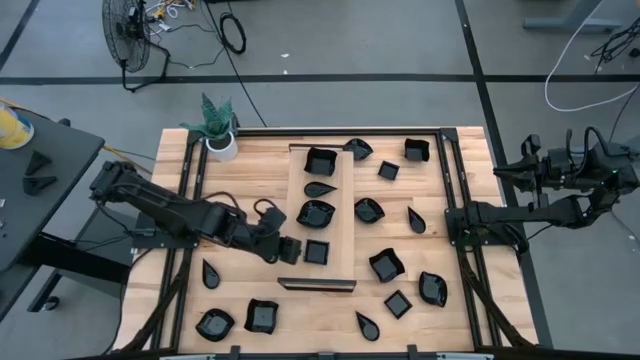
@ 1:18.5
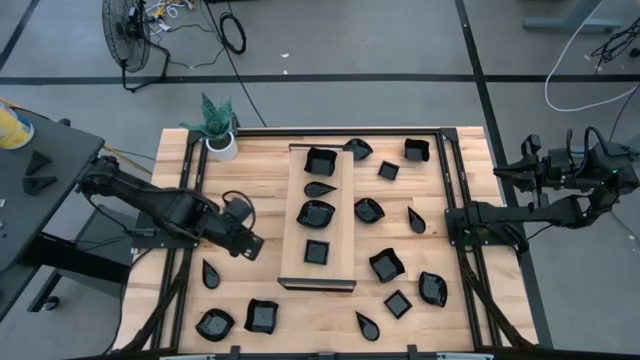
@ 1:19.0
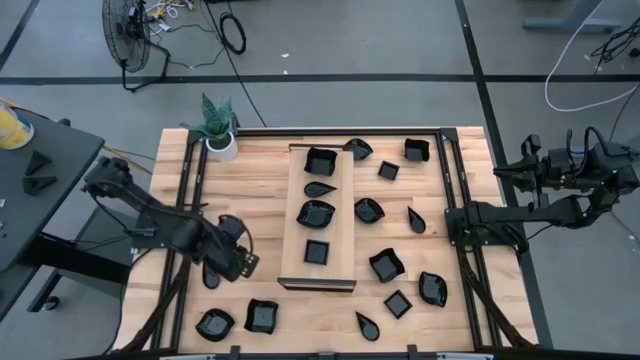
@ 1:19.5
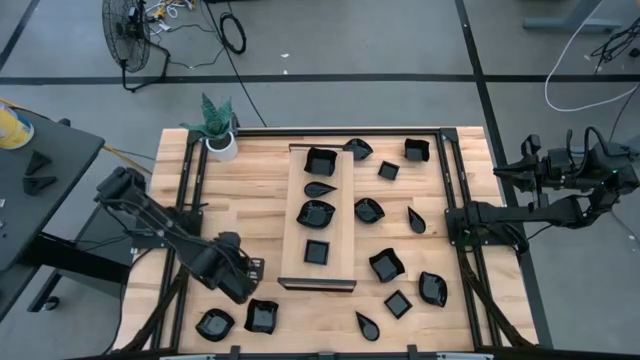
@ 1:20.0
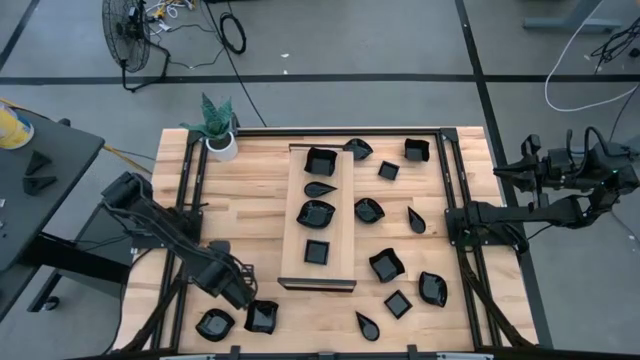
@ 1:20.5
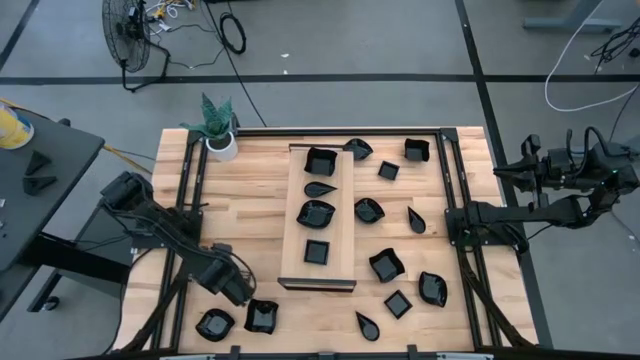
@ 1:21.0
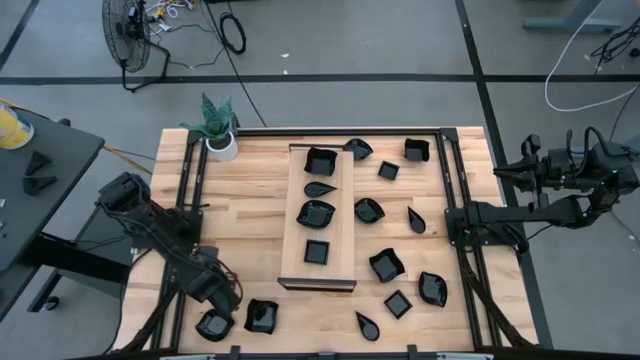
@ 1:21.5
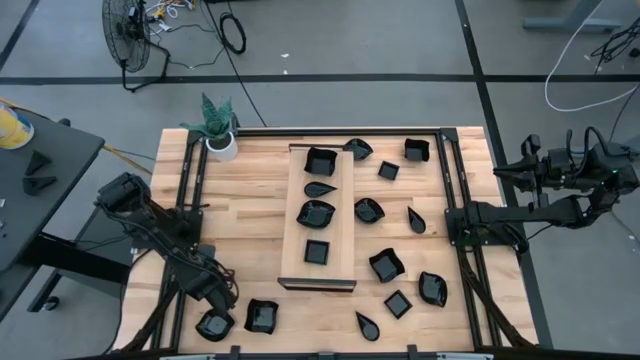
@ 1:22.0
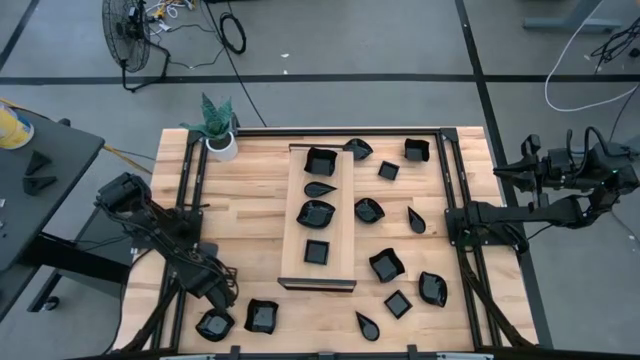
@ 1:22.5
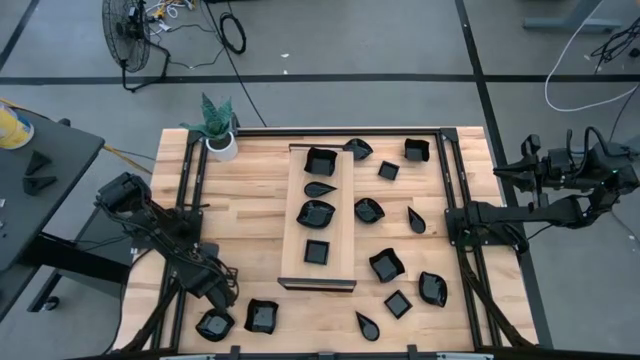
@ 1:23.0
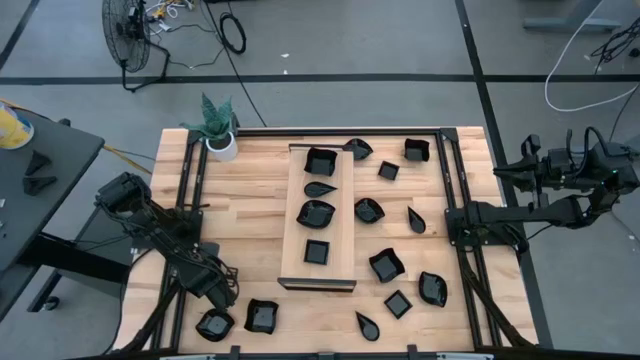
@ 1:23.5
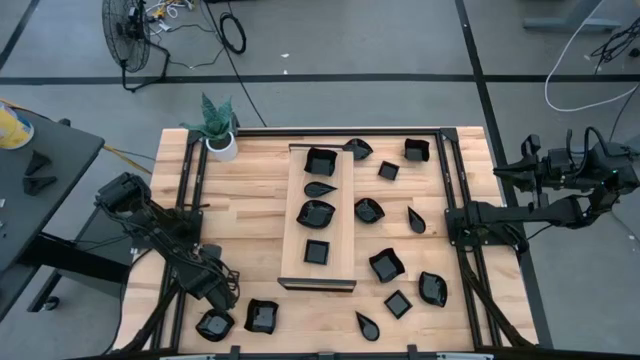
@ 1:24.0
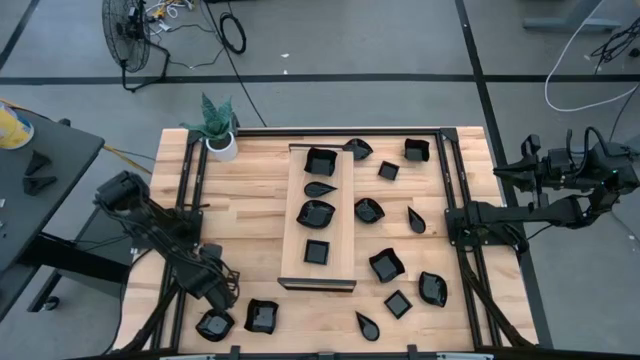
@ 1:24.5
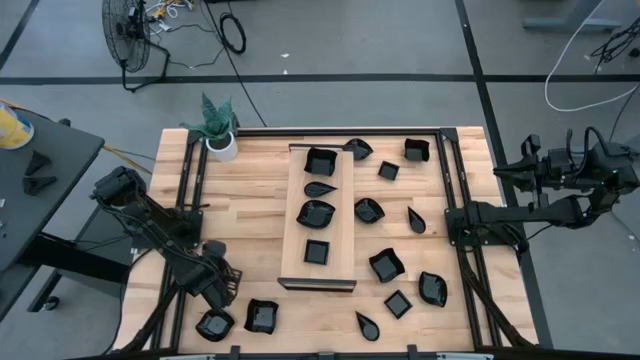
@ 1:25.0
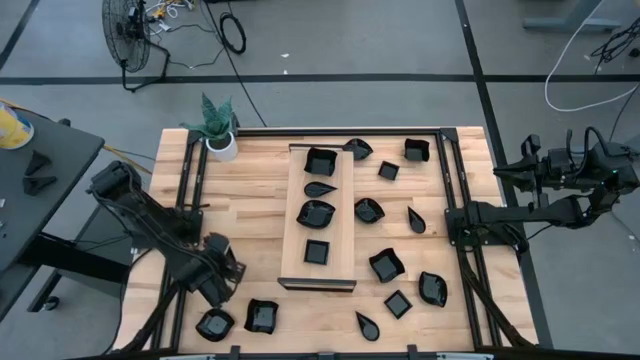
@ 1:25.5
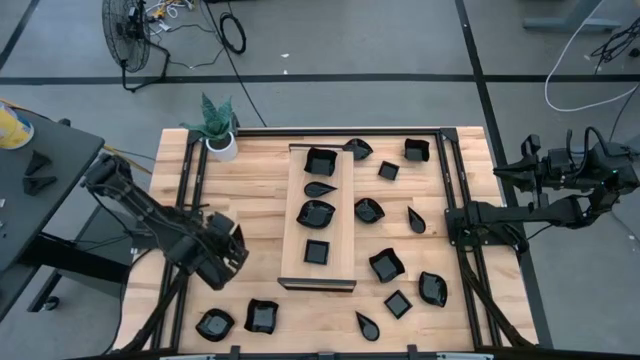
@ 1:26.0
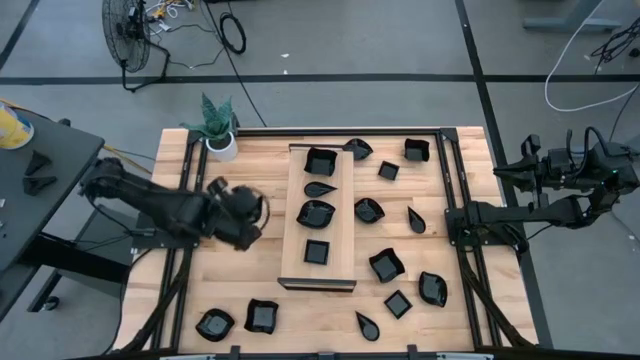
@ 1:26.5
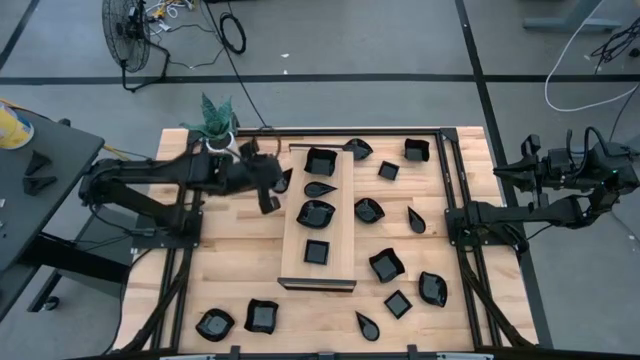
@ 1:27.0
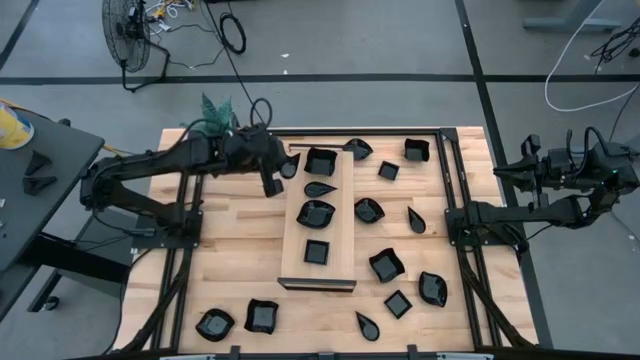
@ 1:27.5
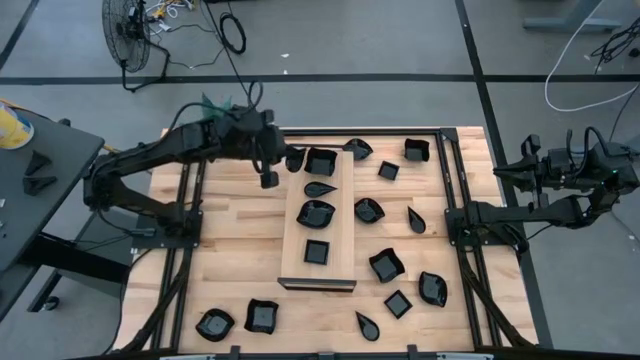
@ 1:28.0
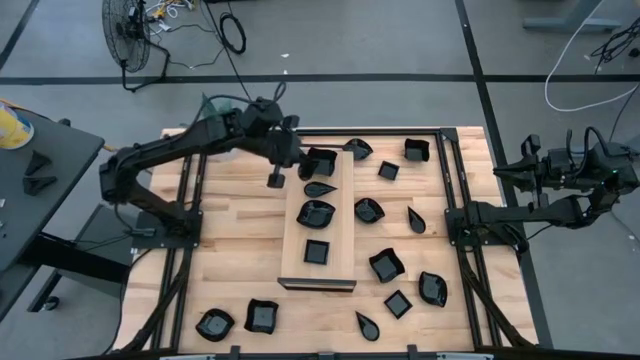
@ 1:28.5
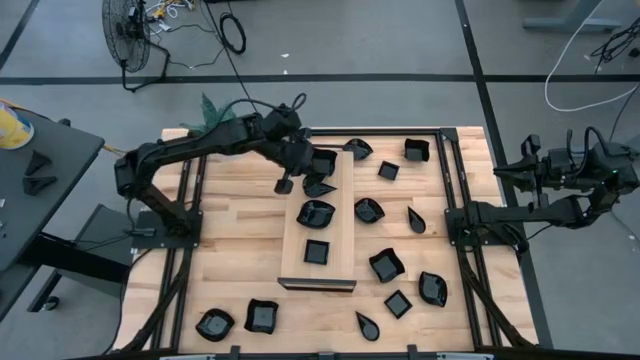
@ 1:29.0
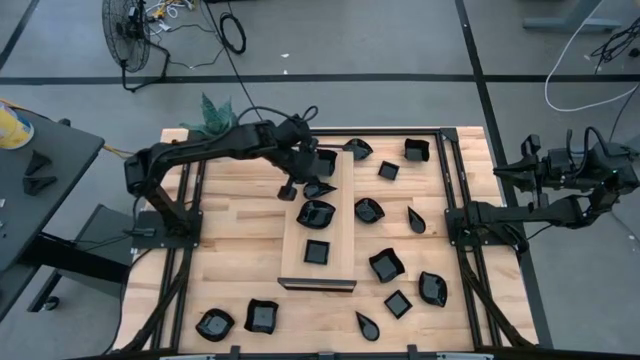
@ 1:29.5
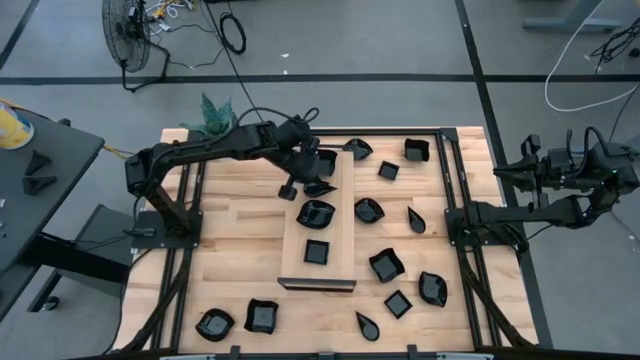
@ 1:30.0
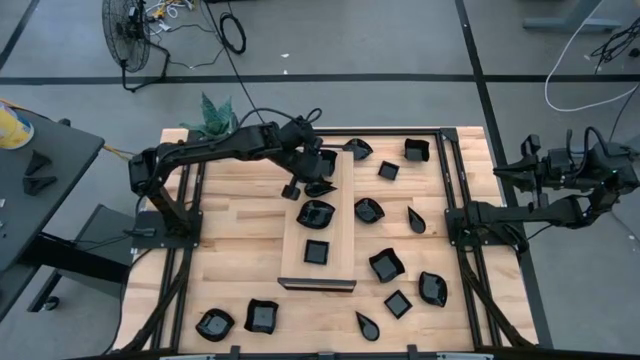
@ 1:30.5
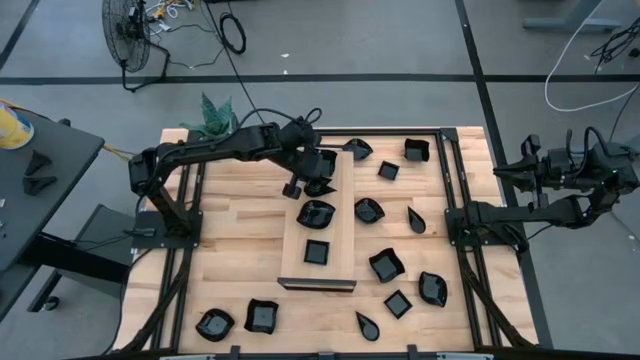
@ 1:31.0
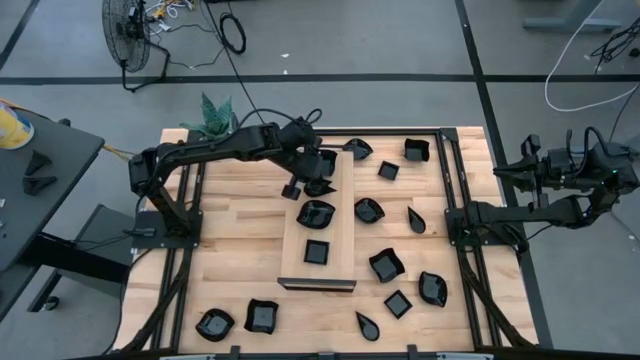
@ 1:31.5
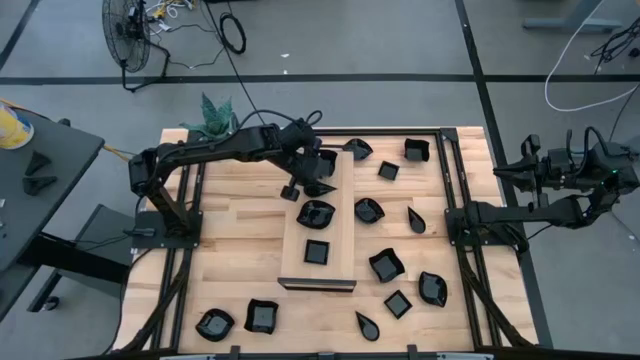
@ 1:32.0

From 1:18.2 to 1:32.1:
Task: Pick & Place Mini shaped plates
Stack the drop shaped plate on top of the drop shaped plate

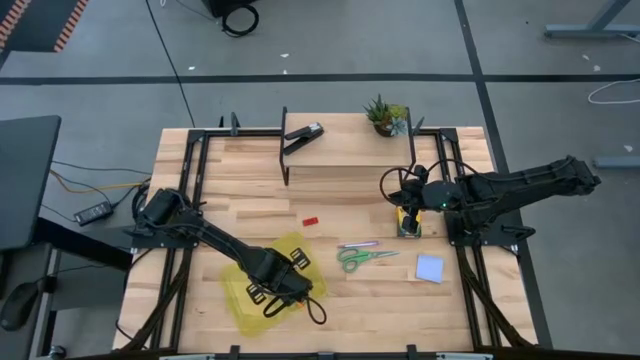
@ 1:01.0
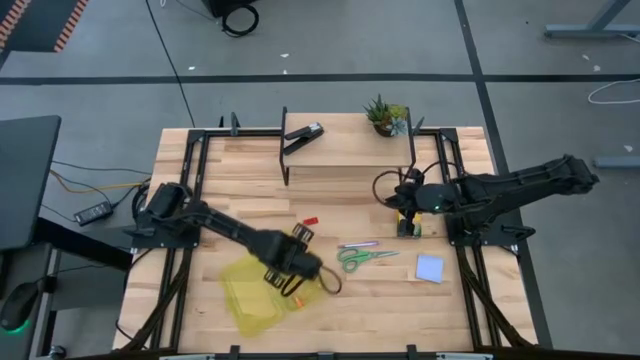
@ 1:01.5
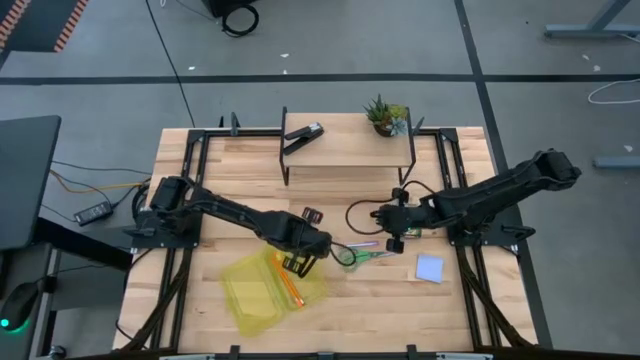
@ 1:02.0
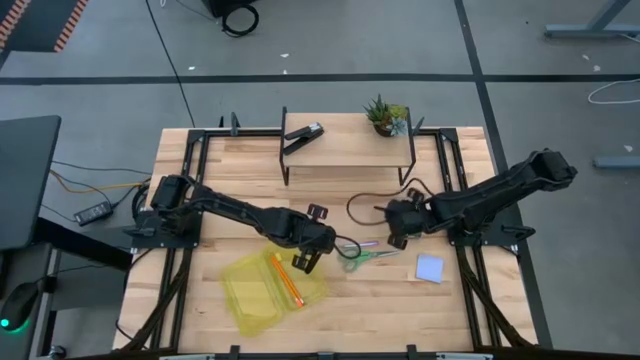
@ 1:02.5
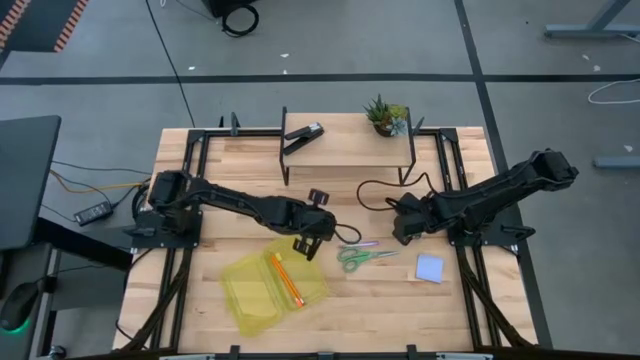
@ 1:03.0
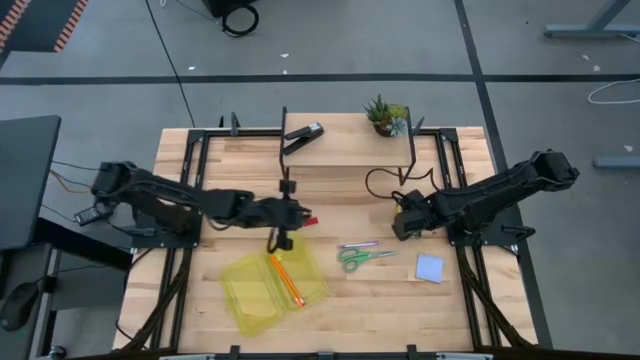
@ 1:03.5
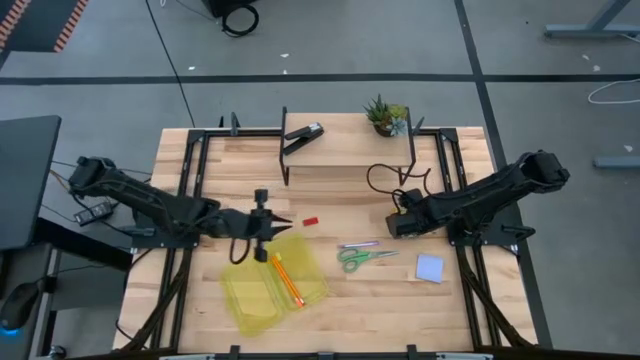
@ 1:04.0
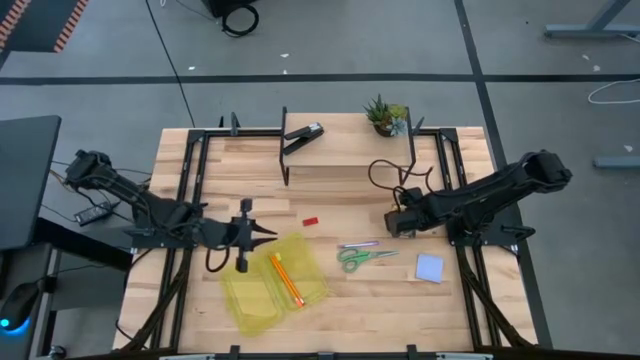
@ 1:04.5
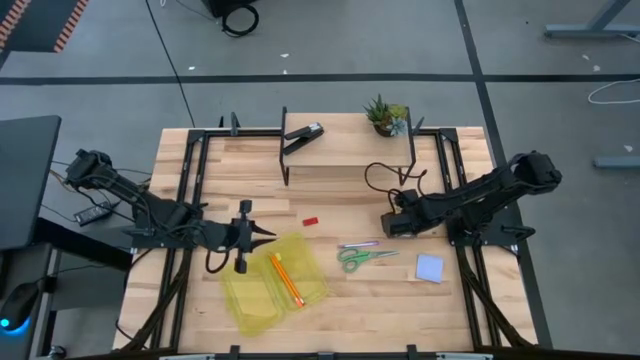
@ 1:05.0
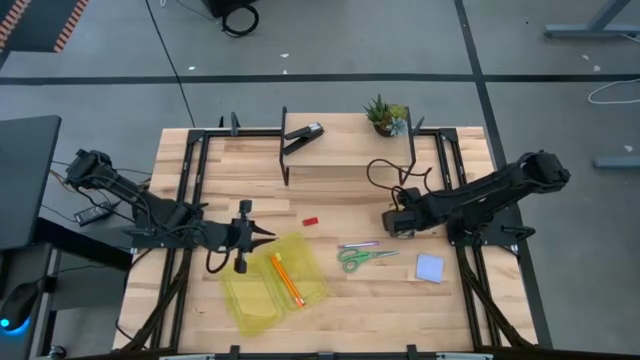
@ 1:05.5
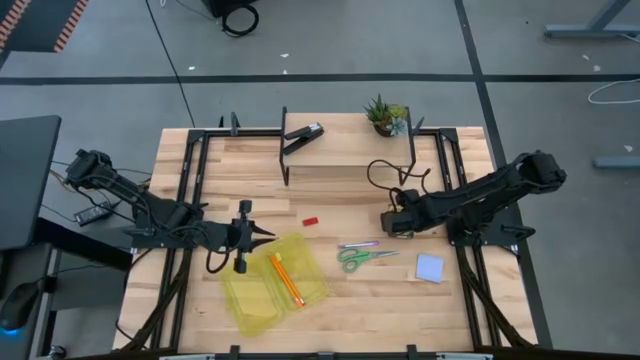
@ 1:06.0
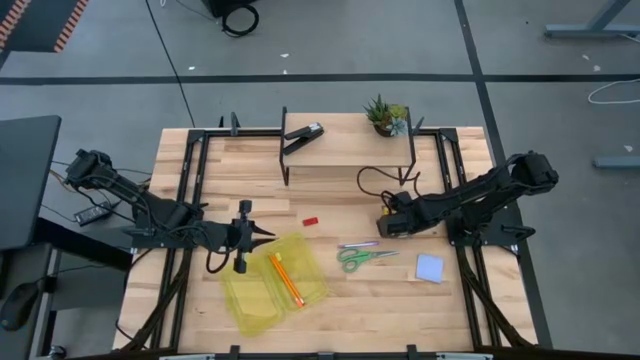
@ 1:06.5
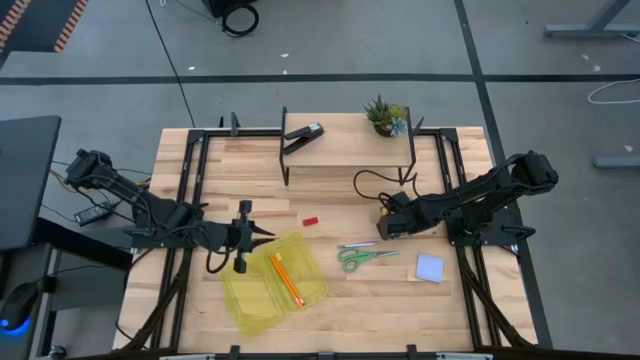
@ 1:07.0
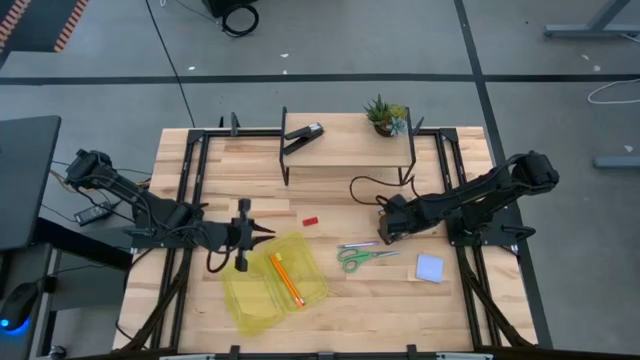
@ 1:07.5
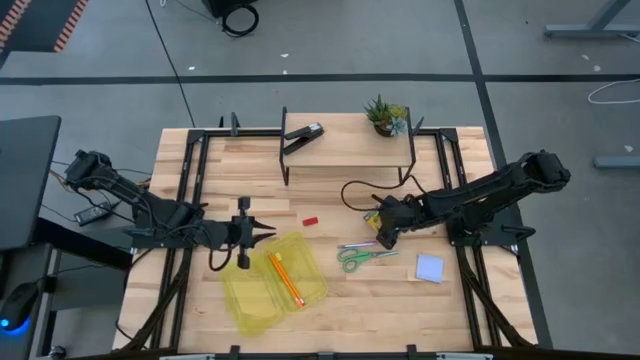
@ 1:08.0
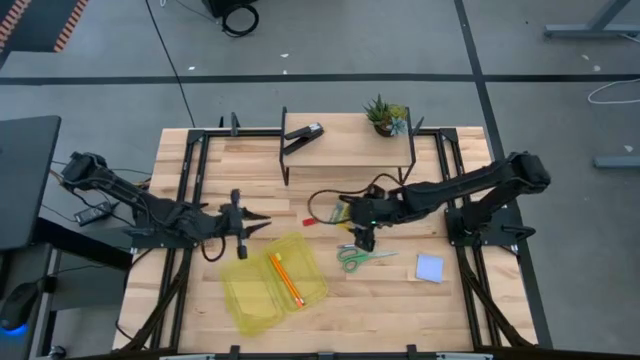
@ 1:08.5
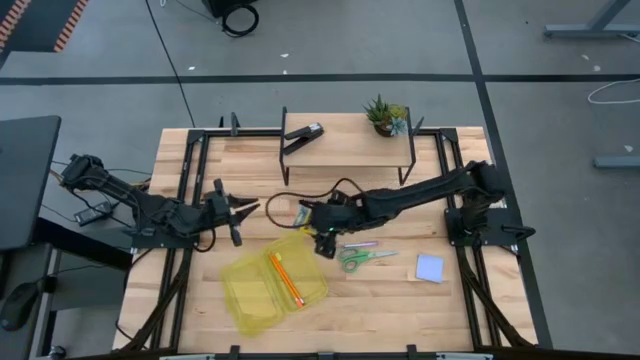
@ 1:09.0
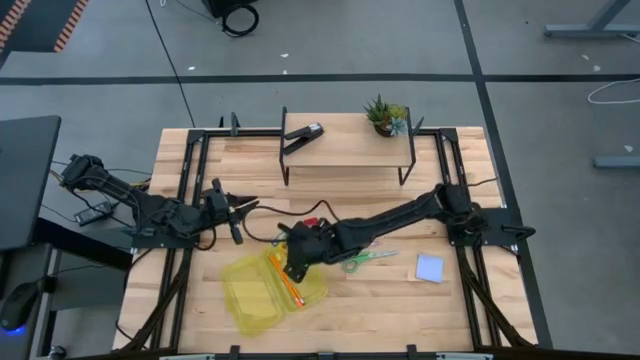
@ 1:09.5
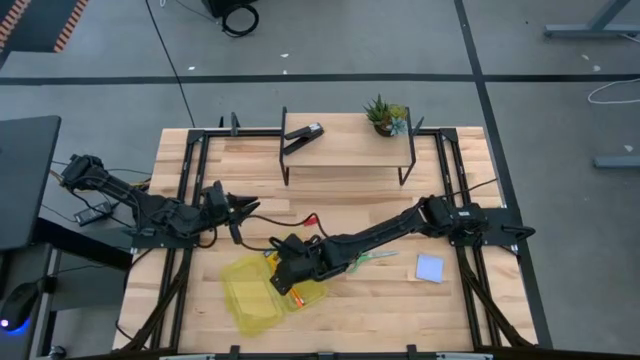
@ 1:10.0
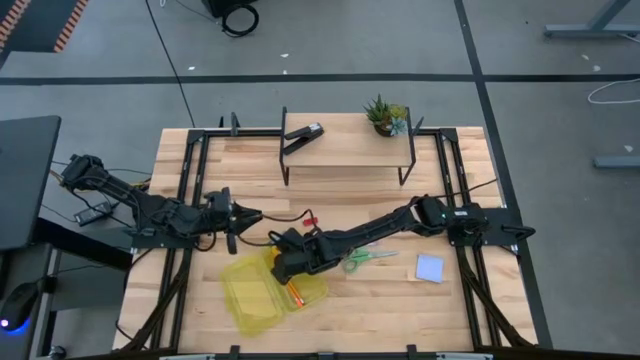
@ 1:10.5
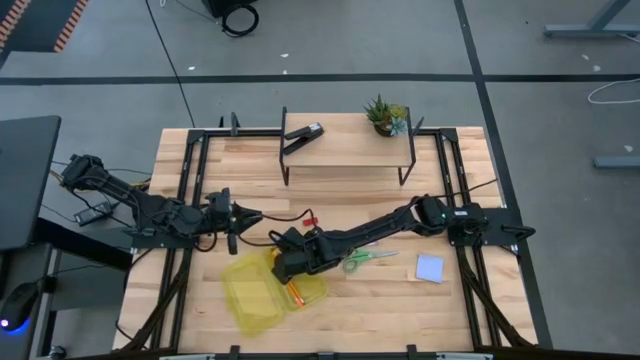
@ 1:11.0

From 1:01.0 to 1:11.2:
Task: Pack school essentials
Put the yellow crayon box into the supply box
